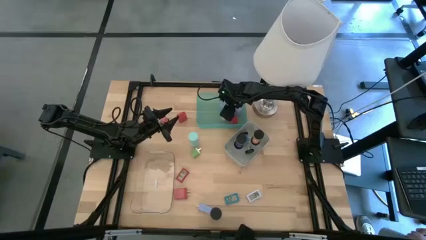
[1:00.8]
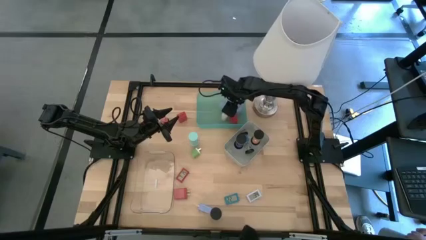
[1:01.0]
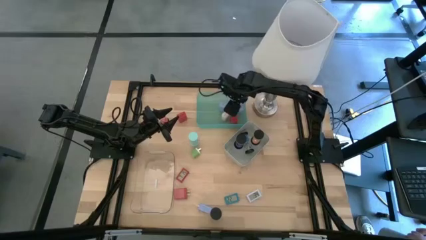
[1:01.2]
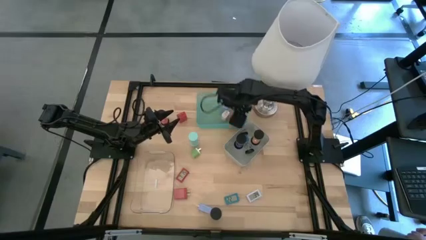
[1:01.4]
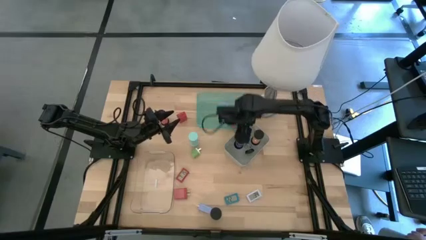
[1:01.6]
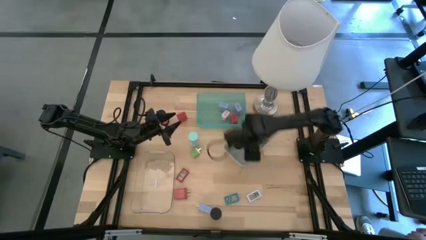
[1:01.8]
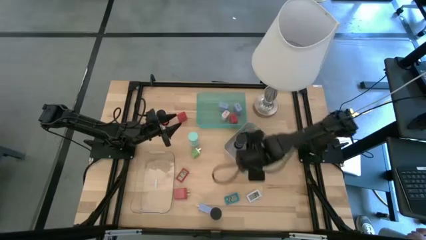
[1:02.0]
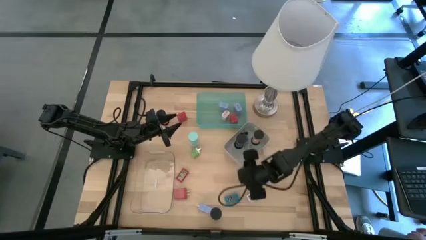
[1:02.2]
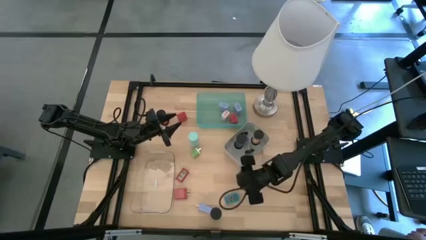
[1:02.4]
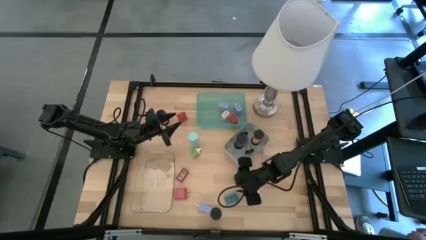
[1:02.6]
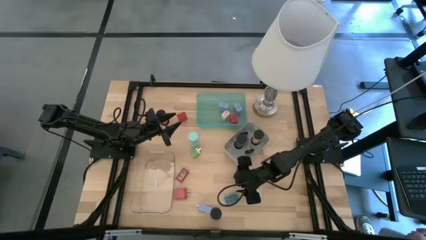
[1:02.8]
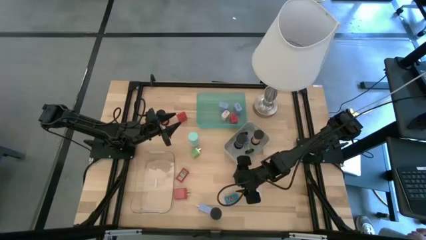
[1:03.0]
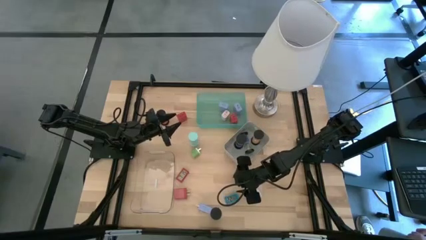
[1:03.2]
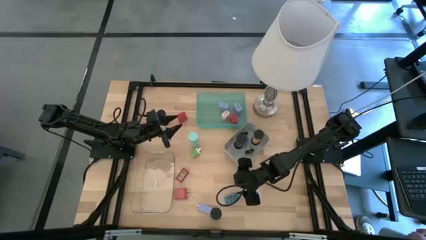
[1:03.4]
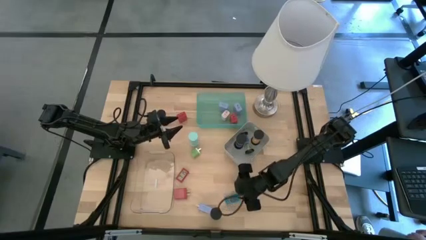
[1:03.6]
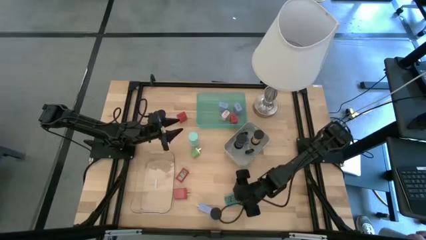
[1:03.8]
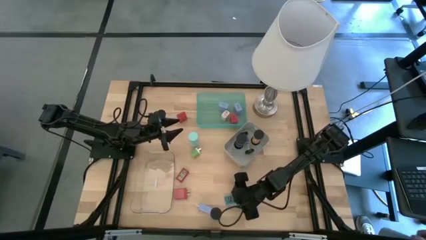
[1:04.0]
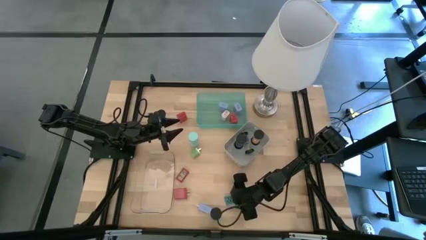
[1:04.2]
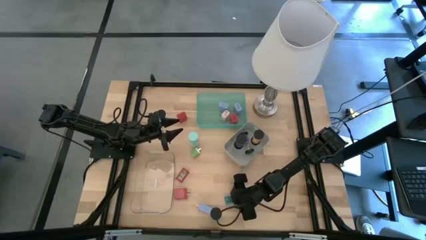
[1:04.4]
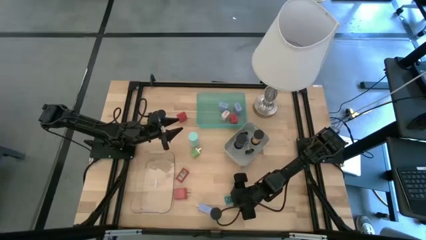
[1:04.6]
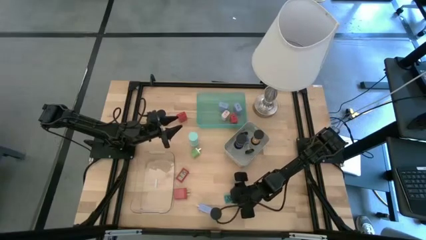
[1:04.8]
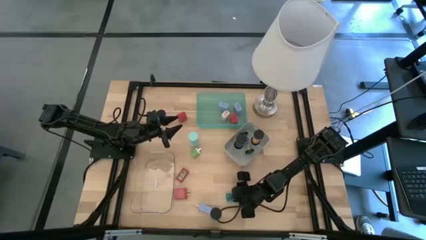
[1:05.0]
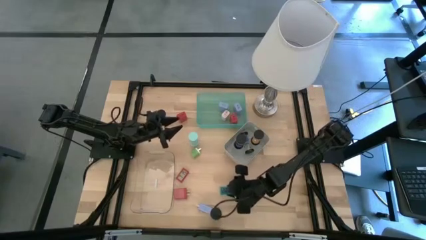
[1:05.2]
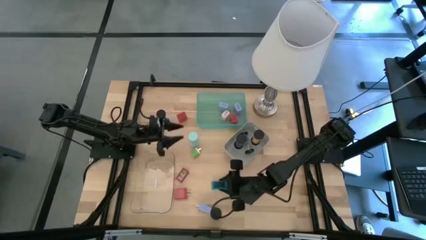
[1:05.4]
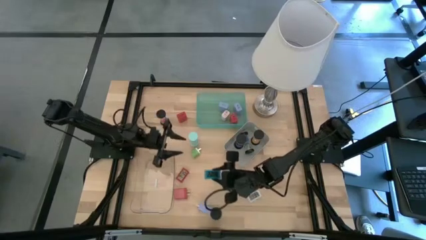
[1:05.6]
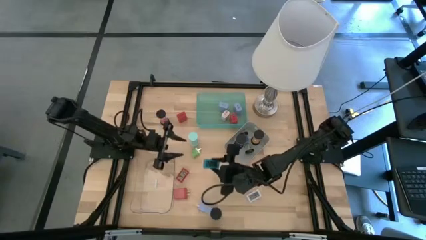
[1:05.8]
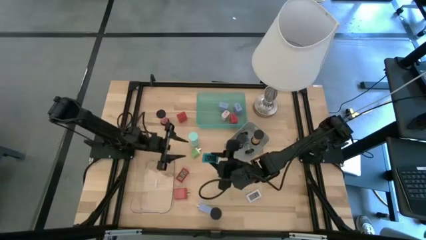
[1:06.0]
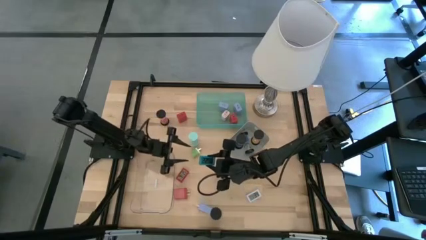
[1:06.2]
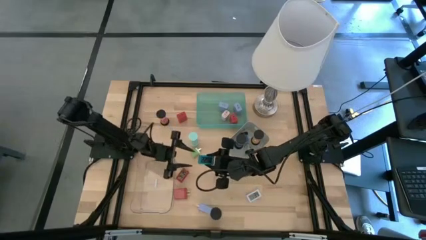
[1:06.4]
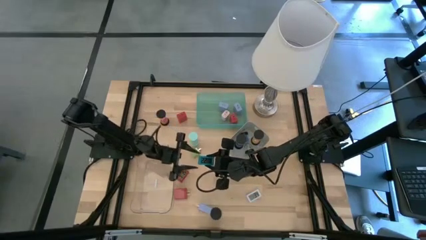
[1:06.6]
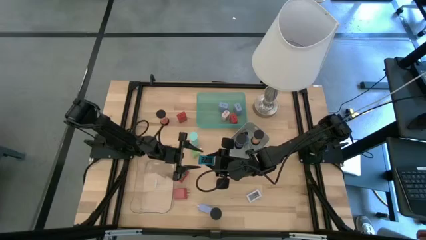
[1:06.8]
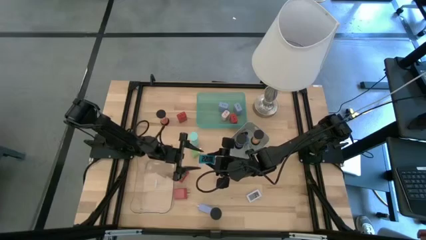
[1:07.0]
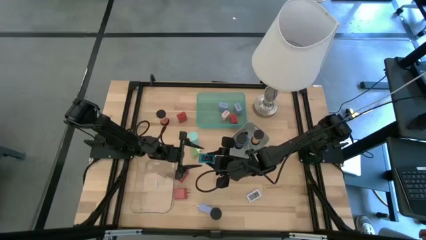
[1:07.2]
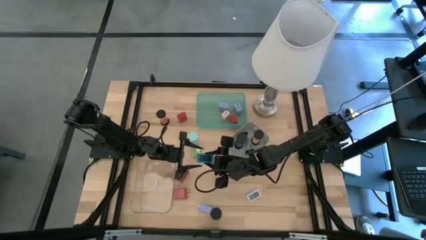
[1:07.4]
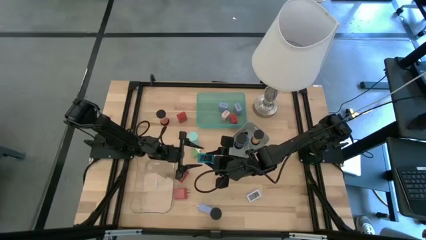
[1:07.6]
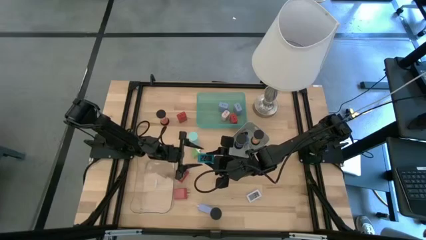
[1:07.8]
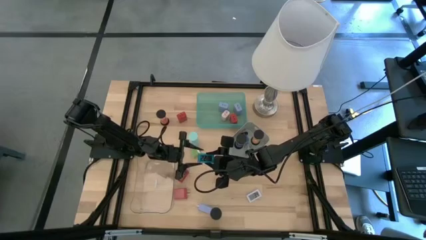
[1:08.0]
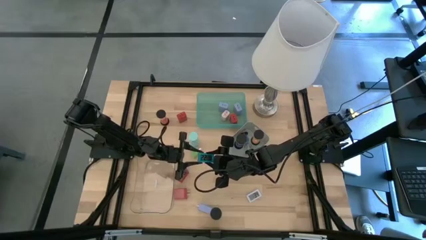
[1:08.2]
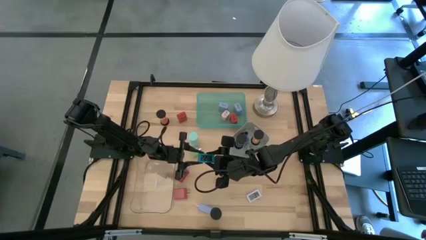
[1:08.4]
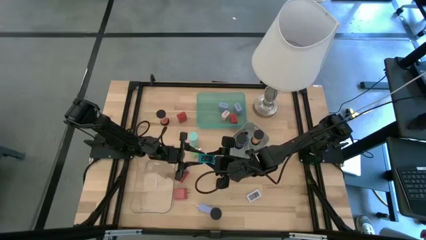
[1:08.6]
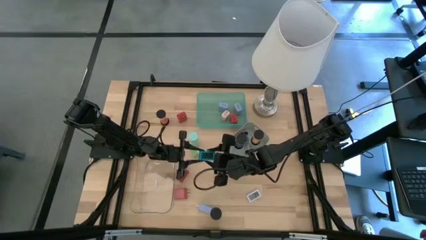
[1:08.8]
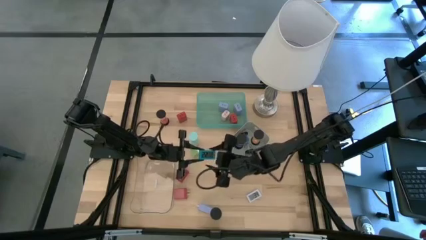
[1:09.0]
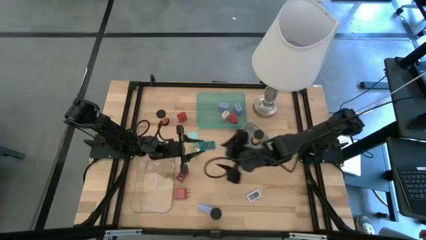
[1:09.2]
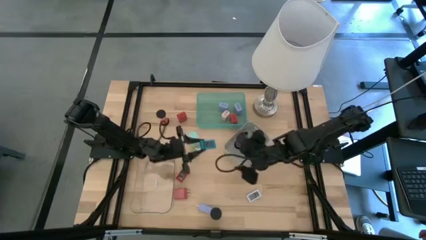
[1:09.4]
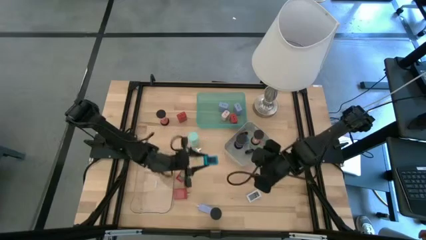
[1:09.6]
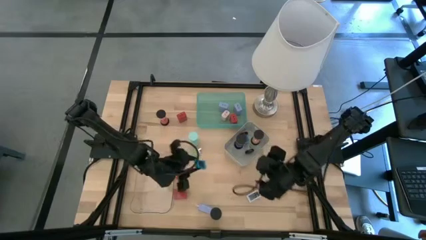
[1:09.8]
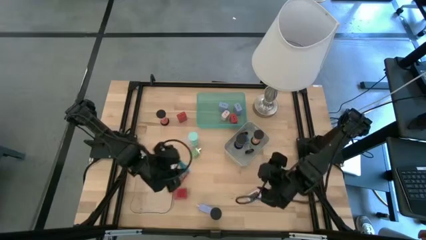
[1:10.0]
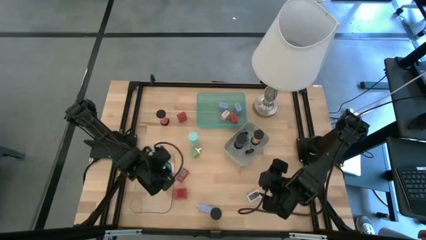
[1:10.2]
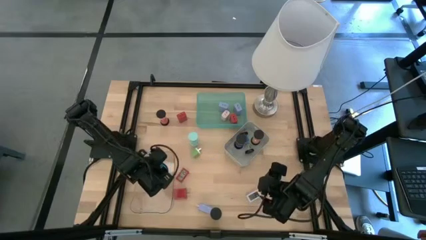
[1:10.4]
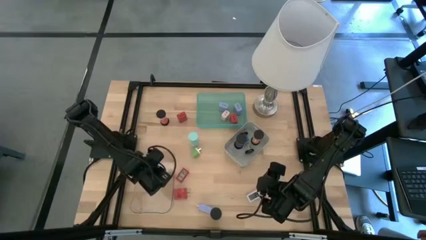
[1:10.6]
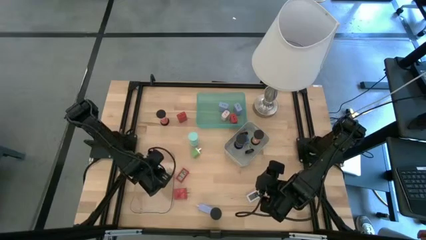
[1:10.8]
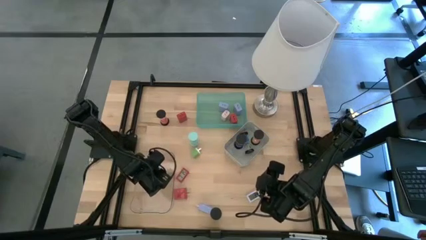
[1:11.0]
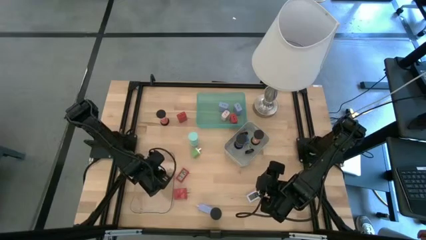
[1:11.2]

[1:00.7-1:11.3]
Task: Pick & Place Office items
Put the blue digital clock into the transparent bin

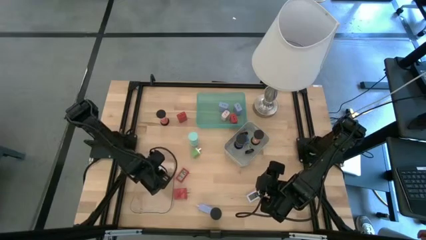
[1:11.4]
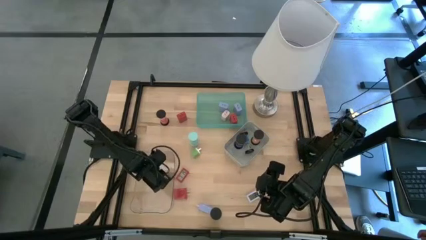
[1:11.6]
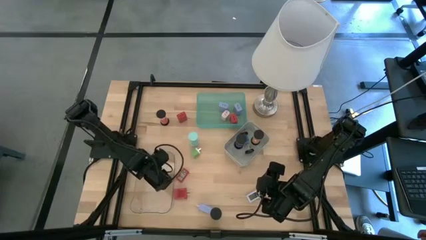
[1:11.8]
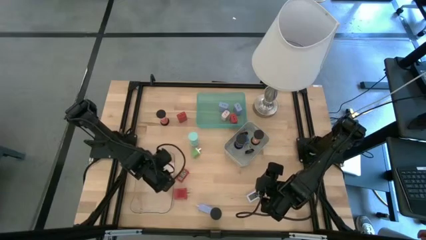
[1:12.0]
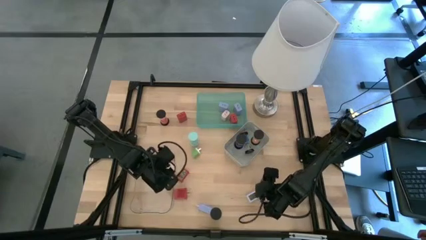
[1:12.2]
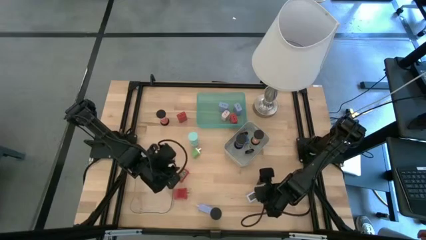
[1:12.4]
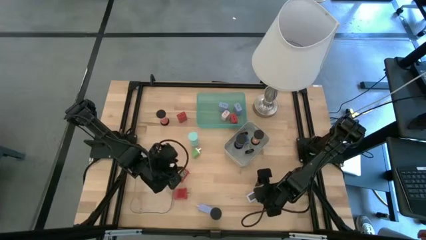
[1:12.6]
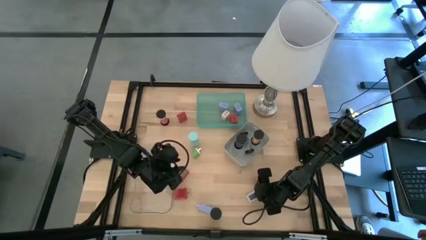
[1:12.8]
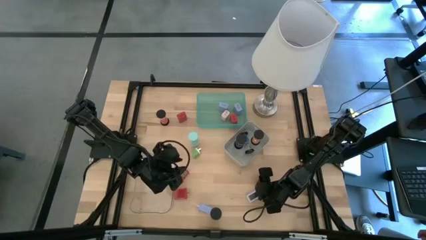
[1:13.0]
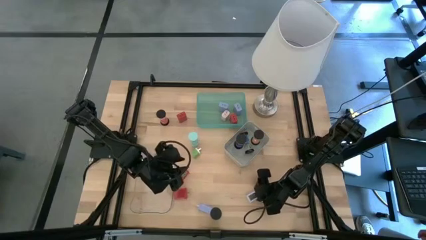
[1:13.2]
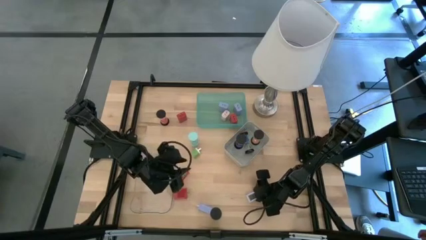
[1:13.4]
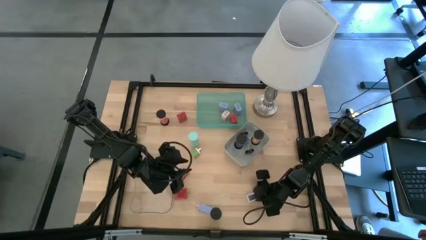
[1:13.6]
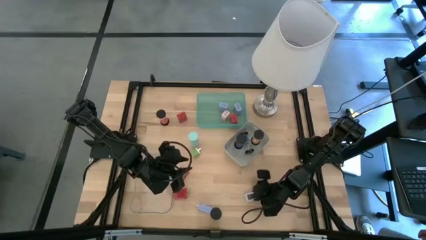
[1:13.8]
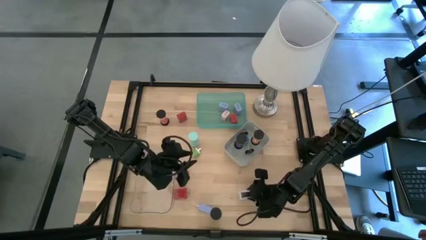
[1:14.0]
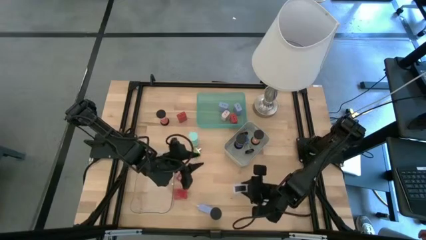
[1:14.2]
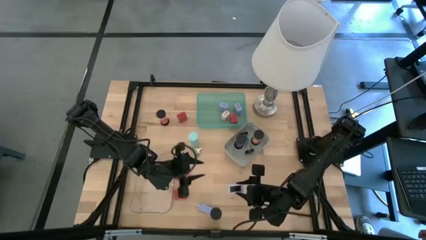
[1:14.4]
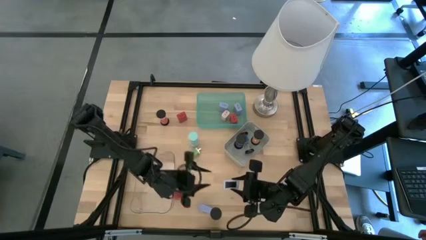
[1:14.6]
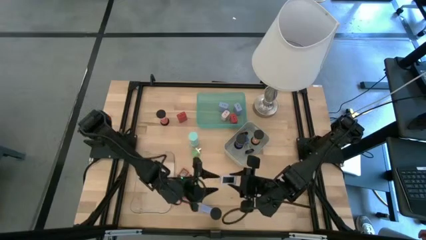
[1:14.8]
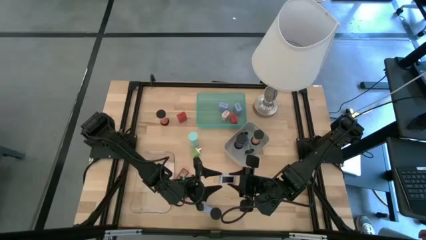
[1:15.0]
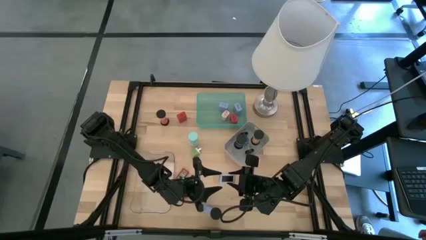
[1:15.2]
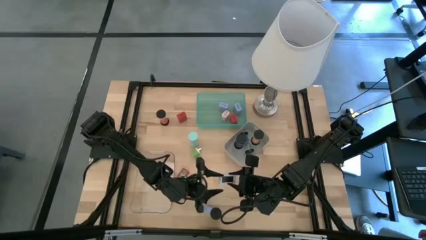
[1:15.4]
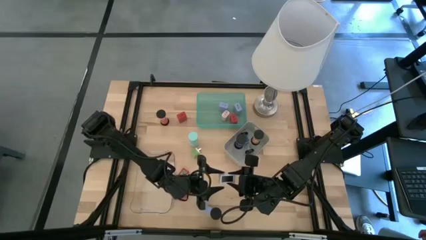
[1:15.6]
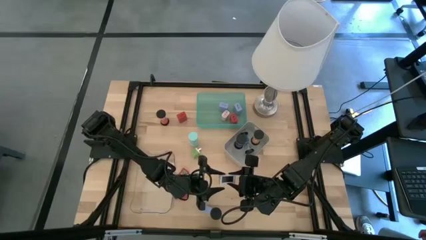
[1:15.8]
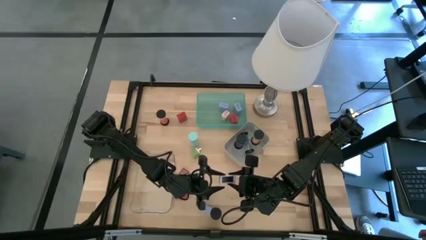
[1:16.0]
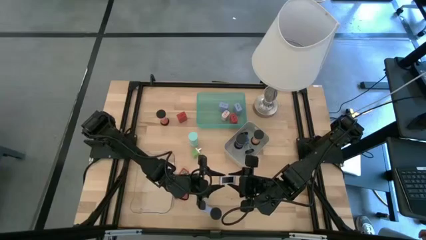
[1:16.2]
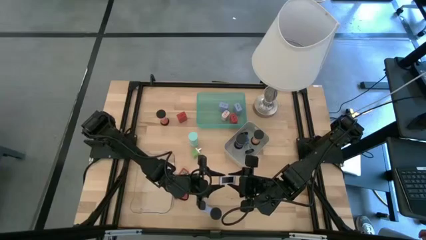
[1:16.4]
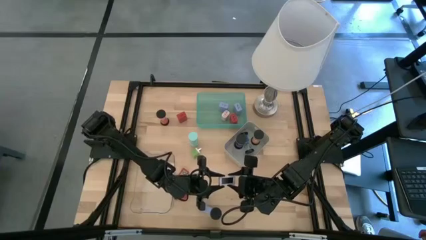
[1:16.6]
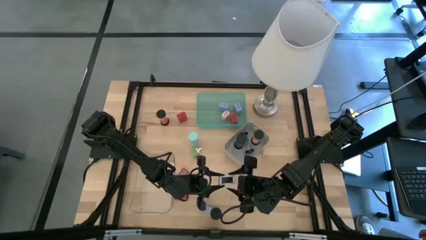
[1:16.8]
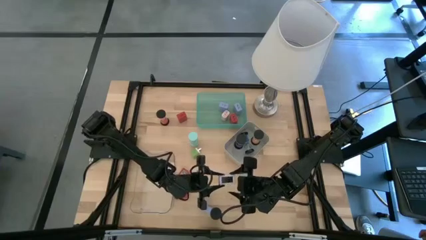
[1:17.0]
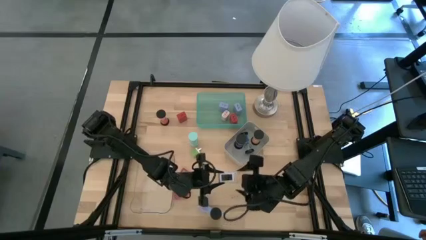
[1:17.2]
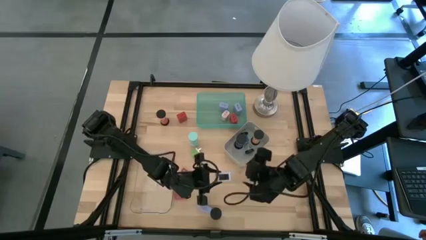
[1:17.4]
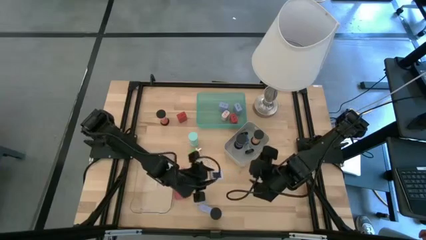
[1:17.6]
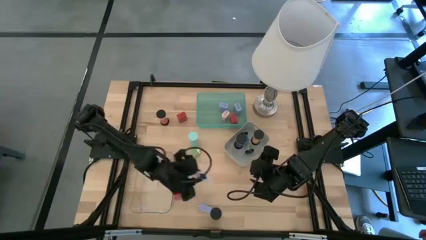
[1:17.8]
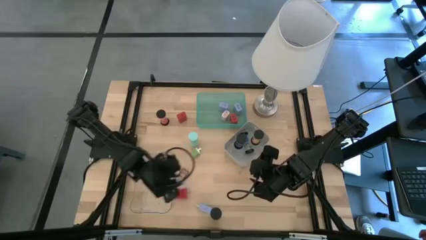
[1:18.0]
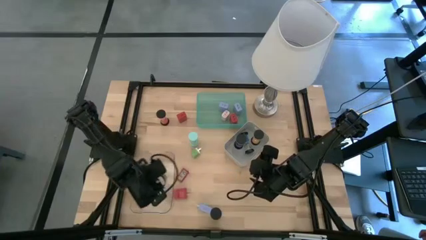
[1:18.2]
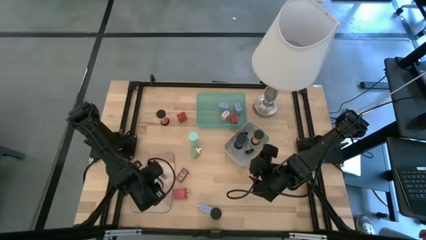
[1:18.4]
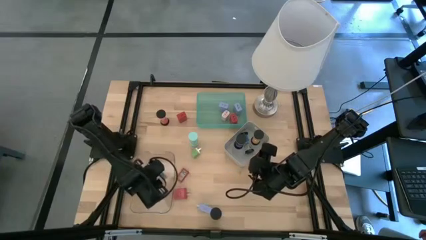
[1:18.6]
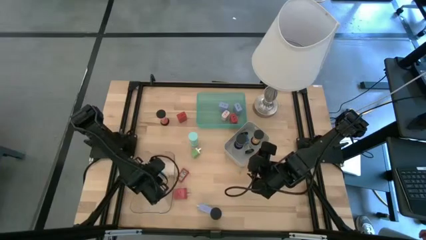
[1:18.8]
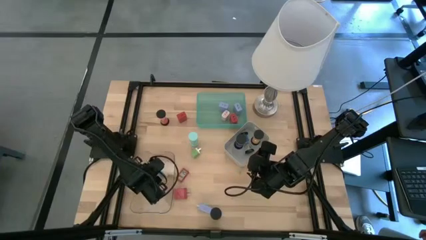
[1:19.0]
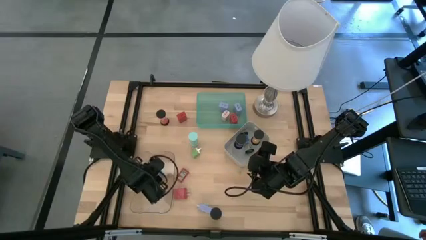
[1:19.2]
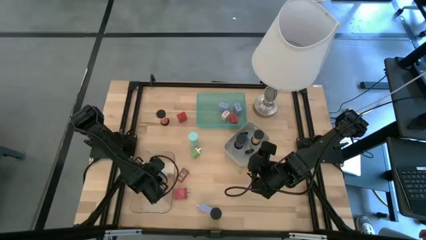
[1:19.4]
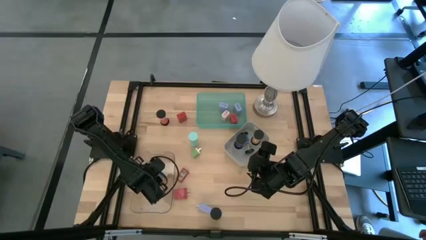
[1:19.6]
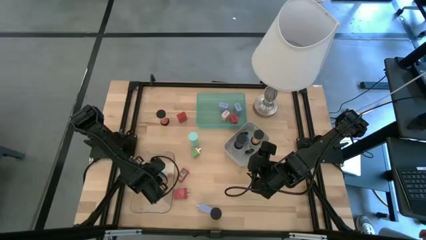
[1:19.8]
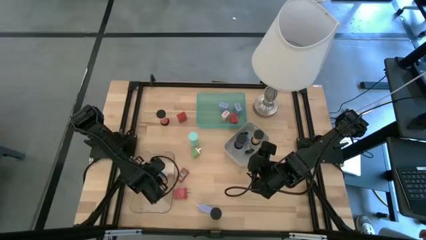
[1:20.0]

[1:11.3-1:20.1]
Put the white digital clock into the transparent bin
